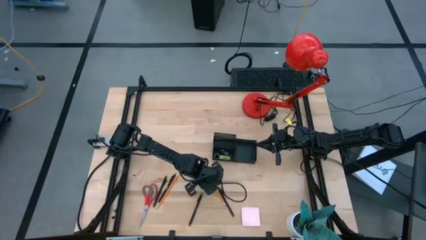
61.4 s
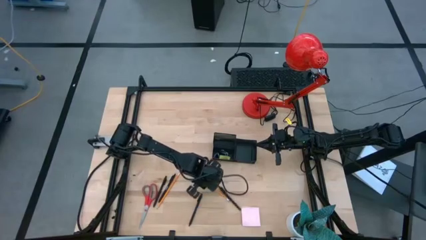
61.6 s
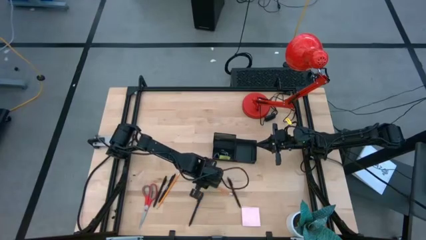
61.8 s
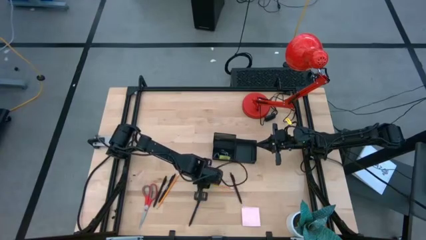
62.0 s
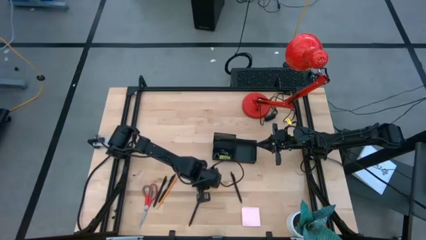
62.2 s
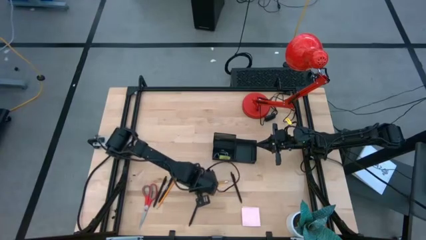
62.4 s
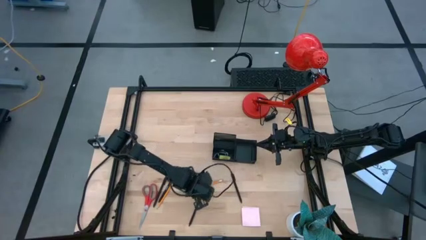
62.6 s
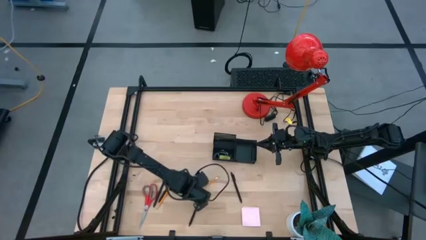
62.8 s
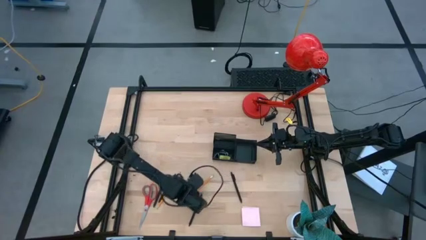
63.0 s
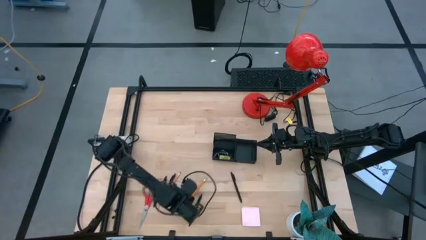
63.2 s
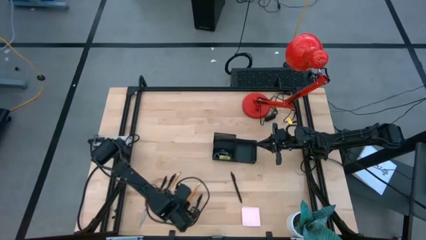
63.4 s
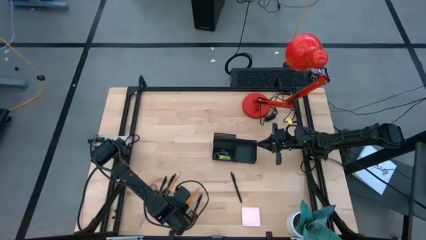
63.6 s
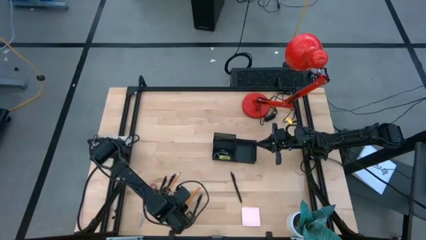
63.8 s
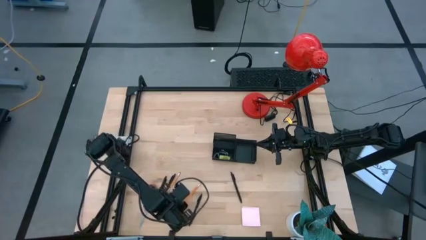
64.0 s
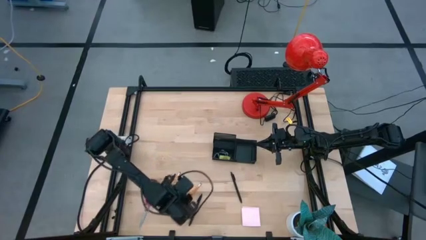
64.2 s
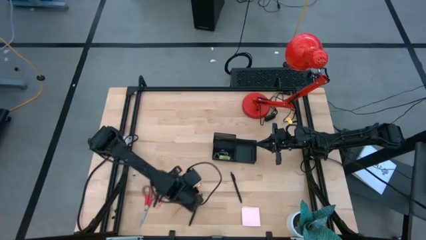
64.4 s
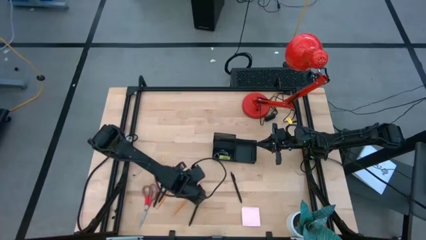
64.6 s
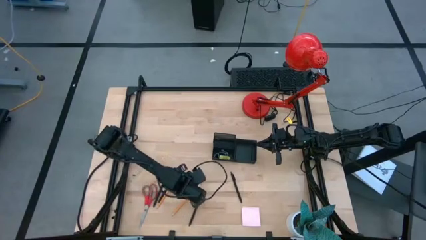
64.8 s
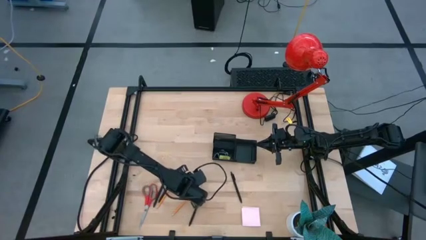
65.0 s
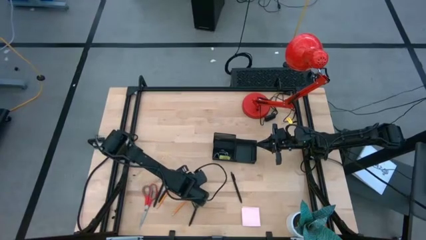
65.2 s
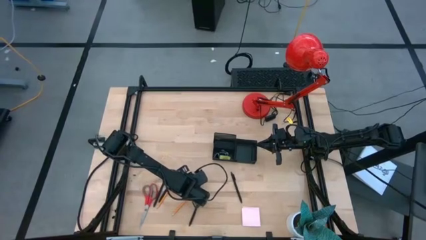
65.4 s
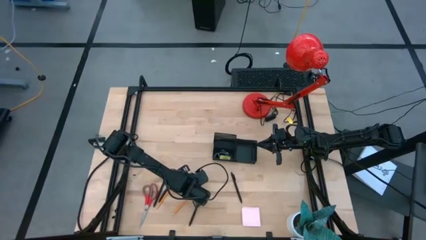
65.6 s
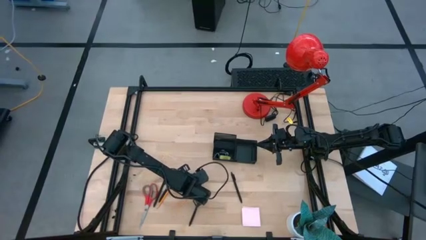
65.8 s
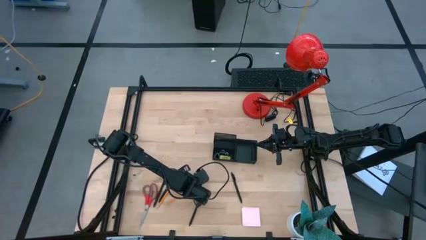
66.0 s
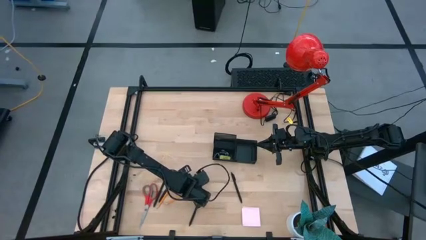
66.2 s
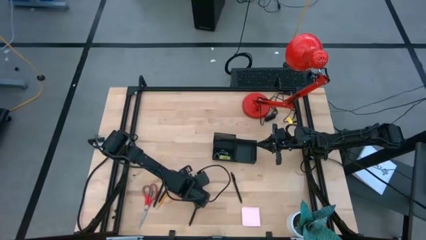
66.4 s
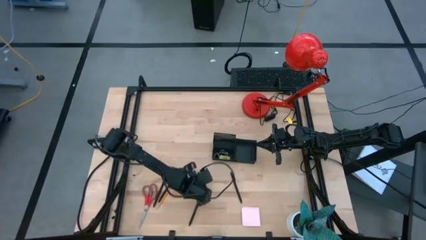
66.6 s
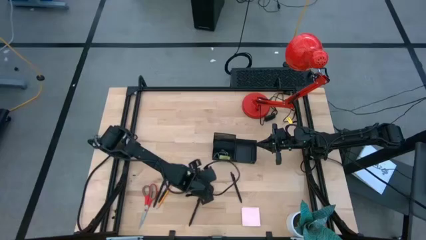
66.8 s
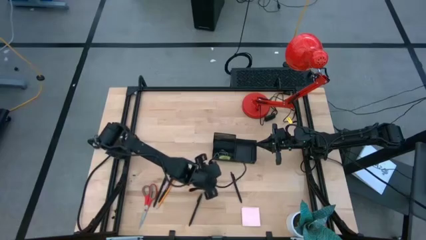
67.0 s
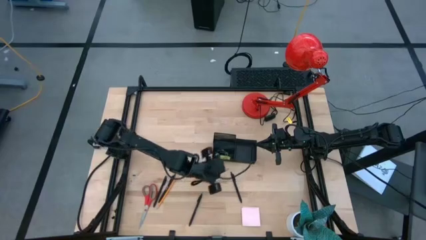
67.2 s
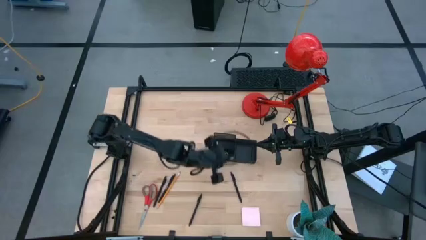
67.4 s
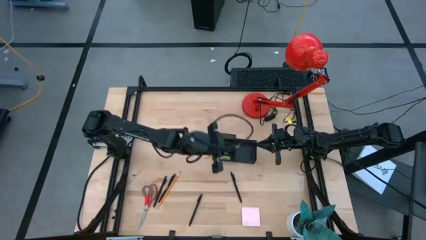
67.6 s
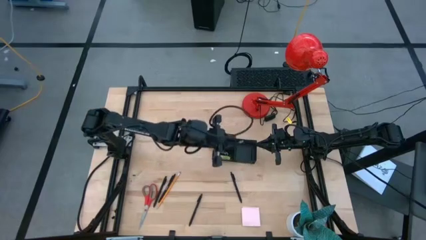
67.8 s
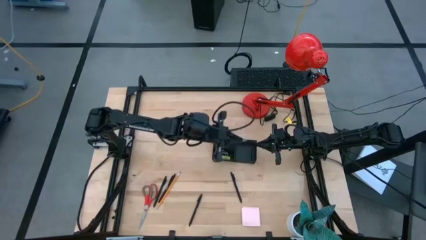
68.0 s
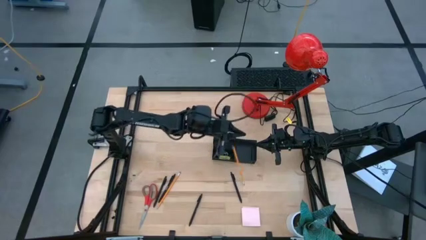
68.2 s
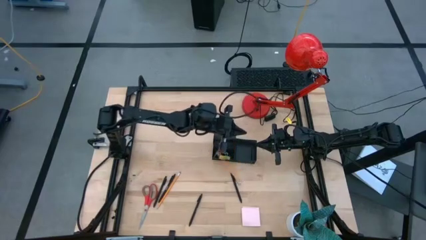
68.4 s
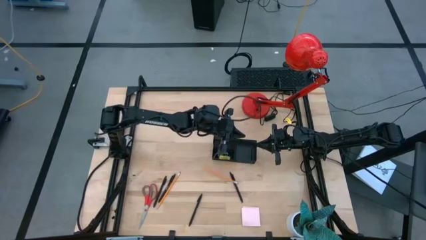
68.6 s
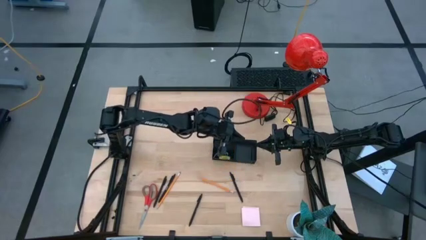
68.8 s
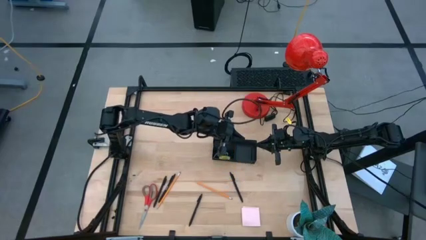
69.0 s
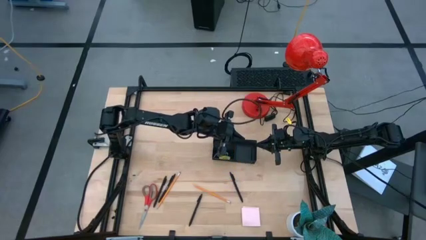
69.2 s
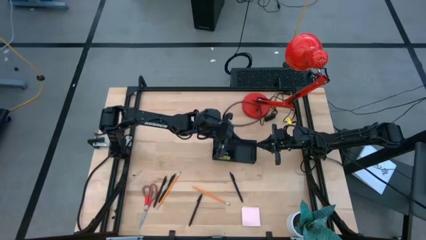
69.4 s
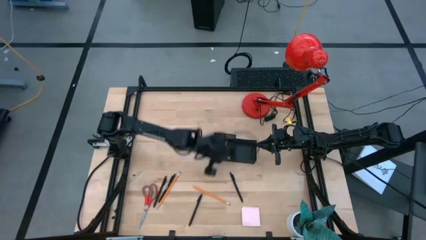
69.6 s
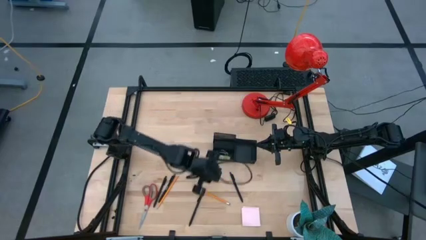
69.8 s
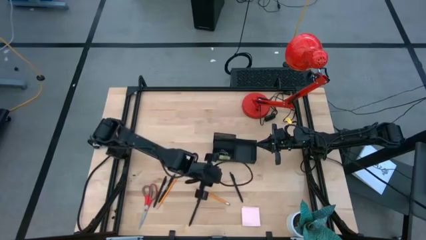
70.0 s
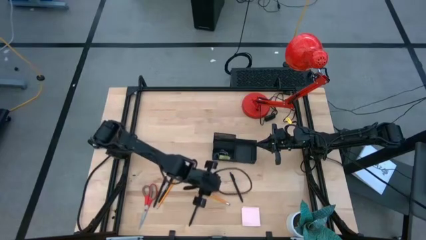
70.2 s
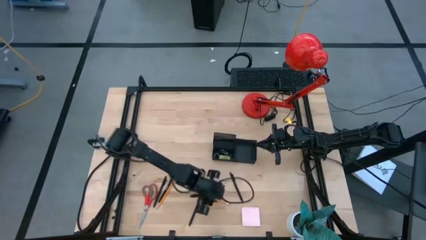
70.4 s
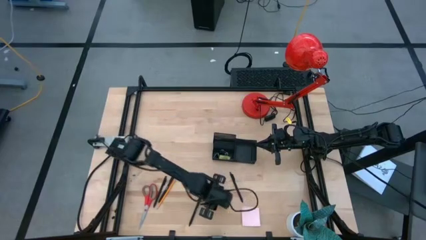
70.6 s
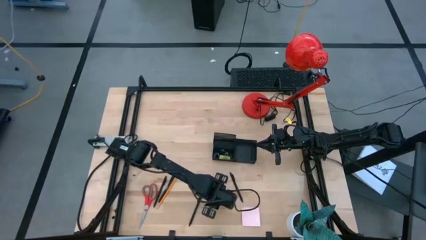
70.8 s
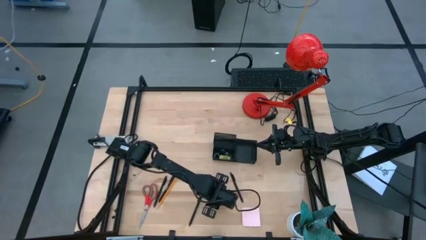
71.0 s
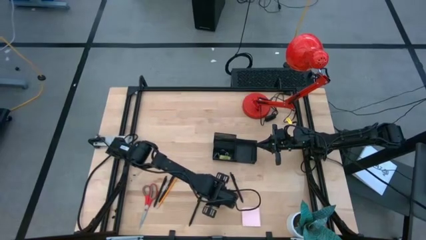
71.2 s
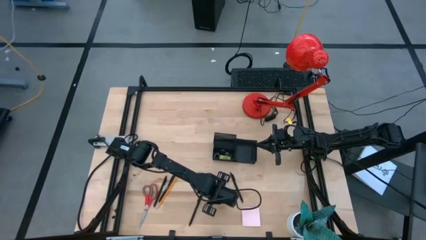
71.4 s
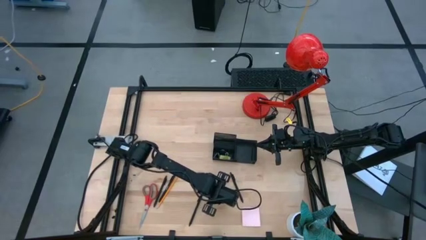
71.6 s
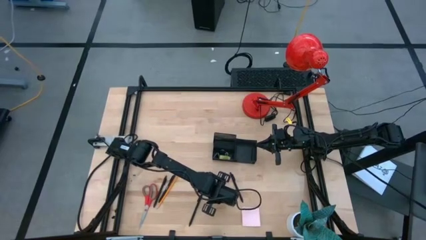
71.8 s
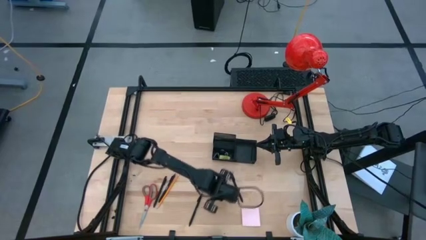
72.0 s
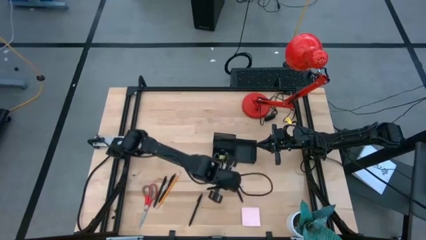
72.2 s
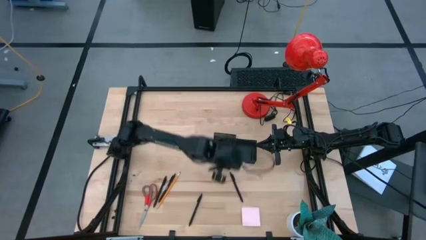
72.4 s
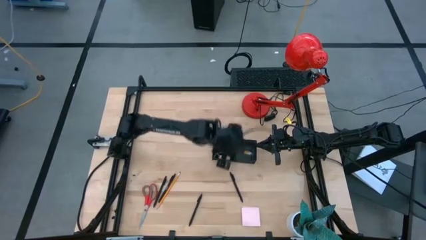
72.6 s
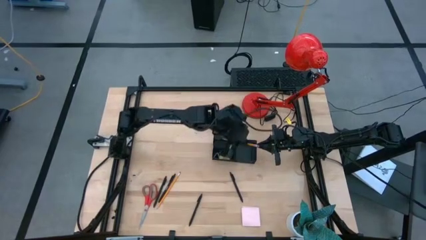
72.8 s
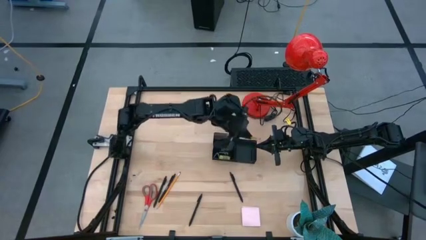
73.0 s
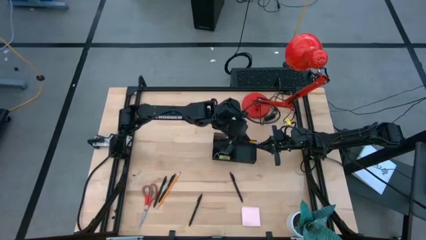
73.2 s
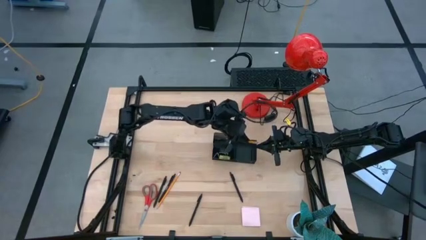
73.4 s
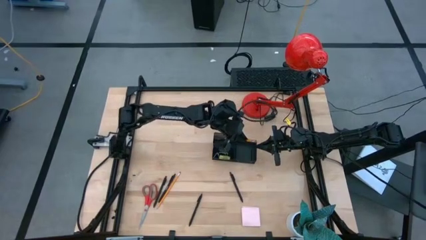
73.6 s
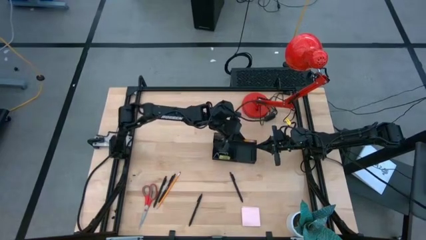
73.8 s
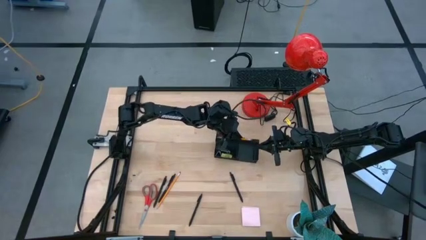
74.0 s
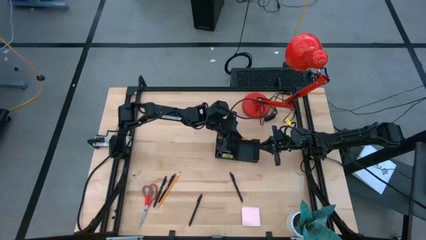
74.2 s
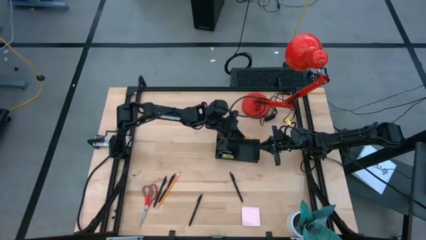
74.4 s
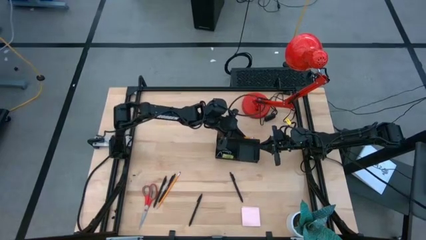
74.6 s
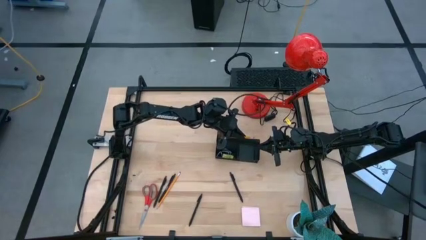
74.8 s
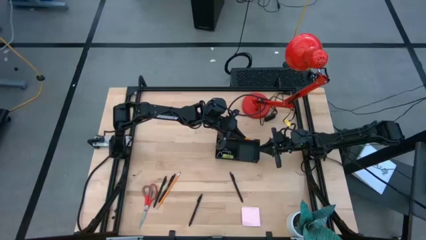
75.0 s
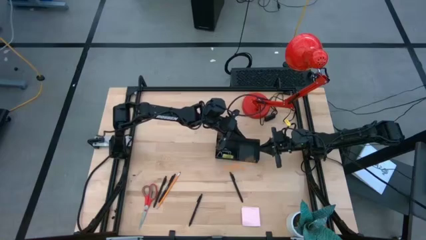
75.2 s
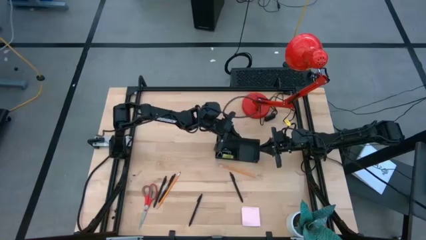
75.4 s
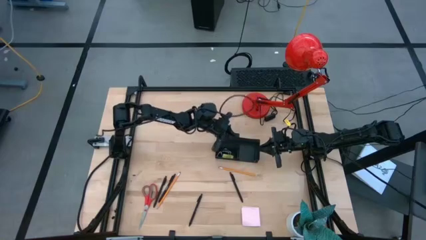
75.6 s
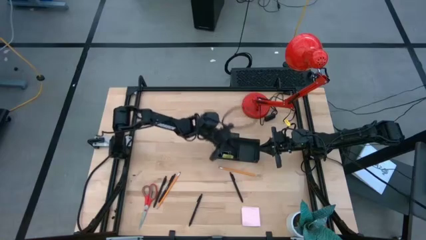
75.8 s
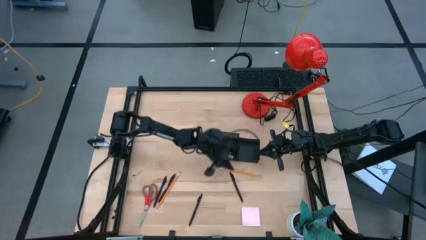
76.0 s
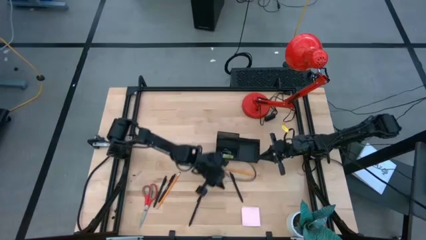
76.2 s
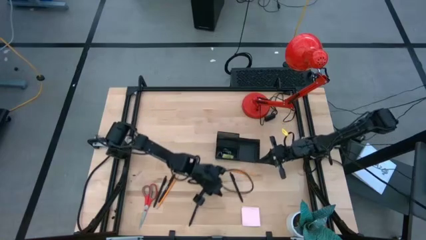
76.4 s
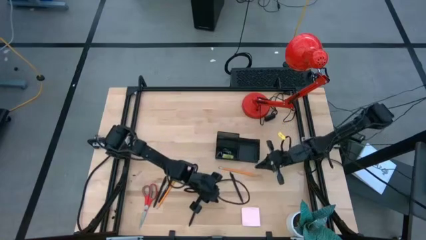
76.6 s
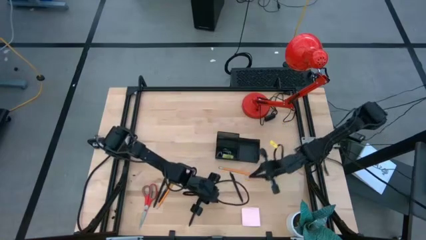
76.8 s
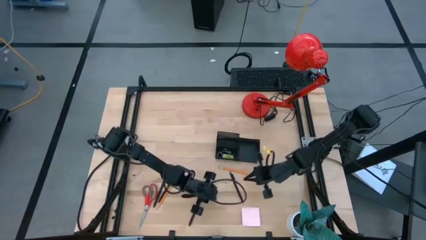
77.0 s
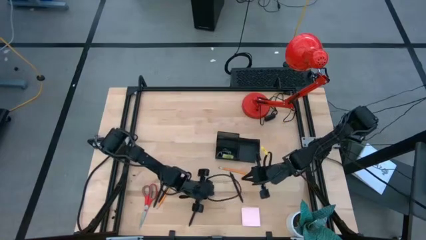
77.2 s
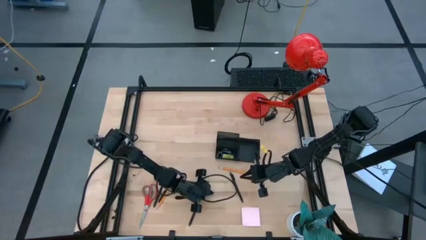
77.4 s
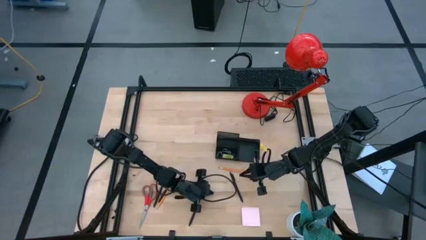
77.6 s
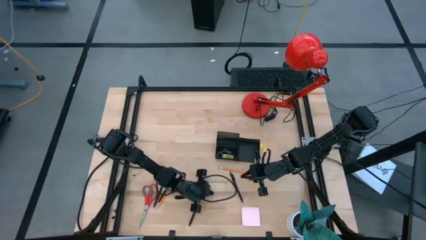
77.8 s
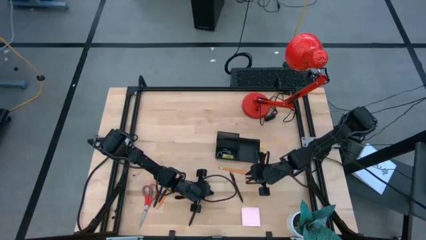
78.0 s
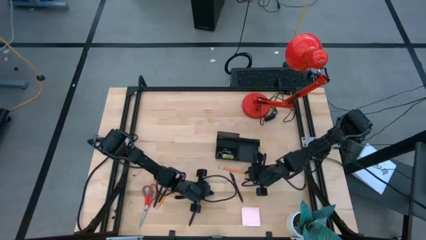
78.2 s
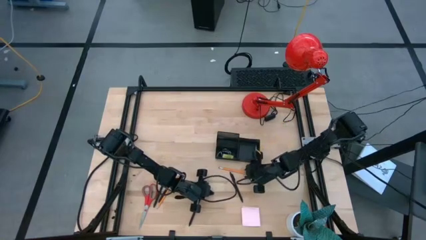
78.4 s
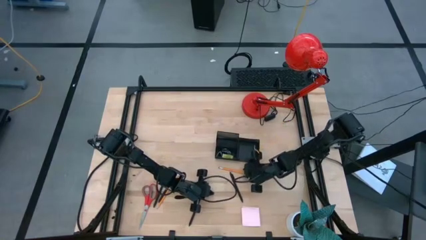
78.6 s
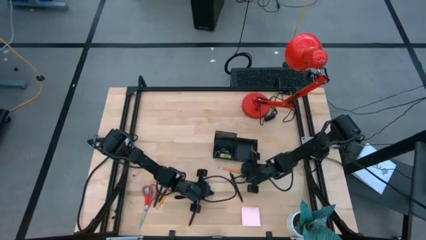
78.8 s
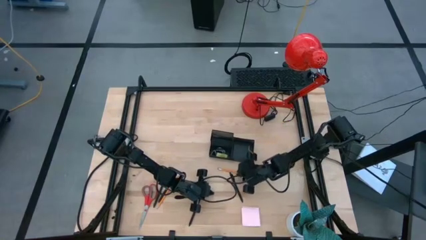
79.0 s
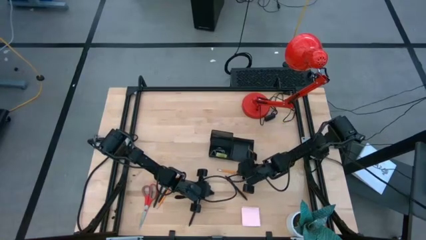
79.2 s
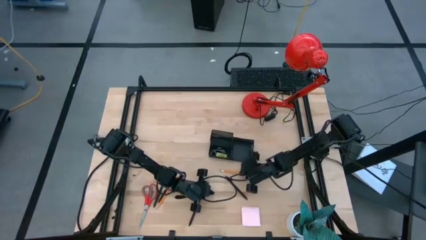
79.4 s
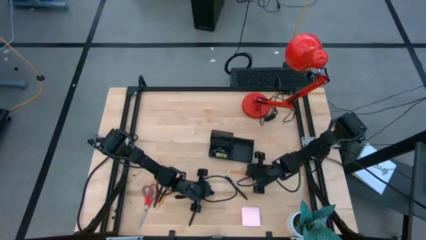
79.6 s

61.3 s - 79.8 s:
Task: Pick and place office supplies into organizer
Put the left yellow pencil into the black desk organizer
